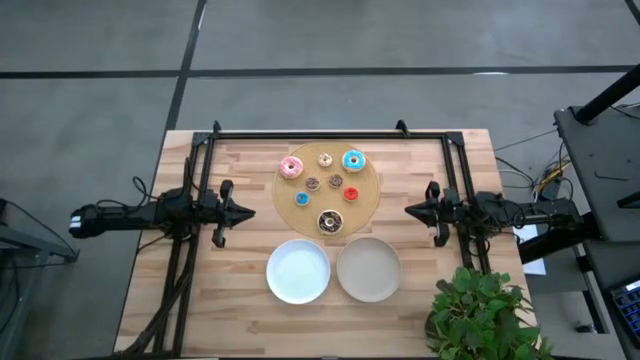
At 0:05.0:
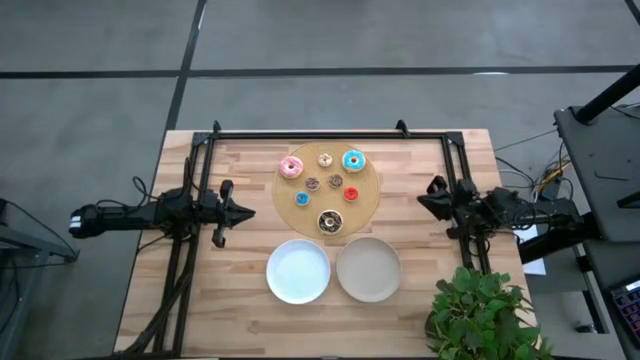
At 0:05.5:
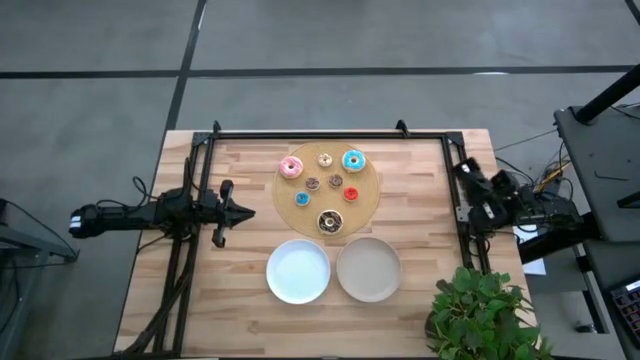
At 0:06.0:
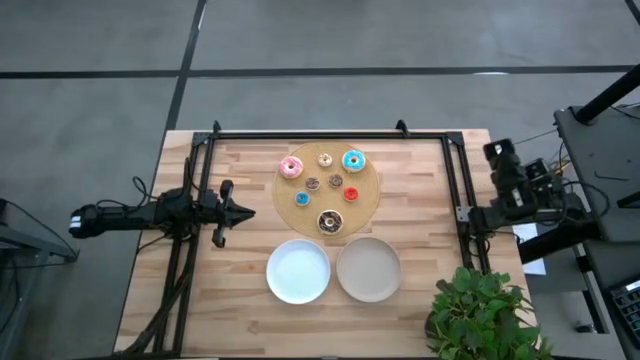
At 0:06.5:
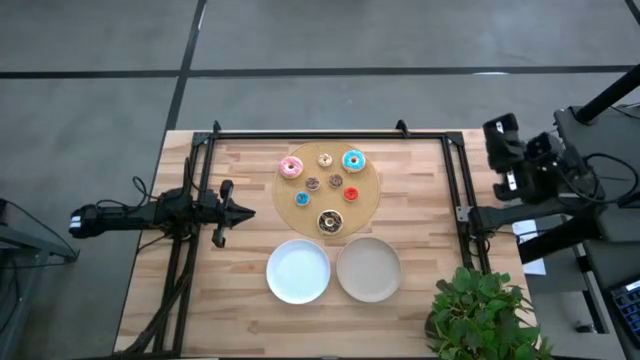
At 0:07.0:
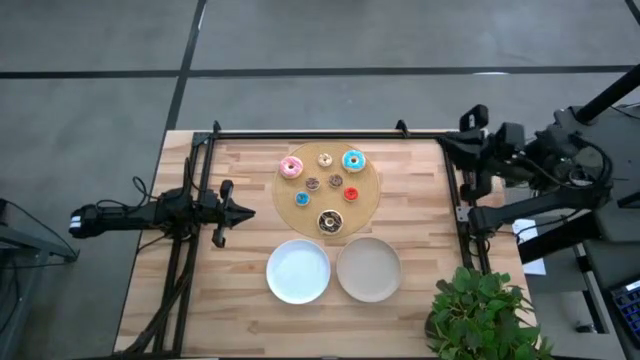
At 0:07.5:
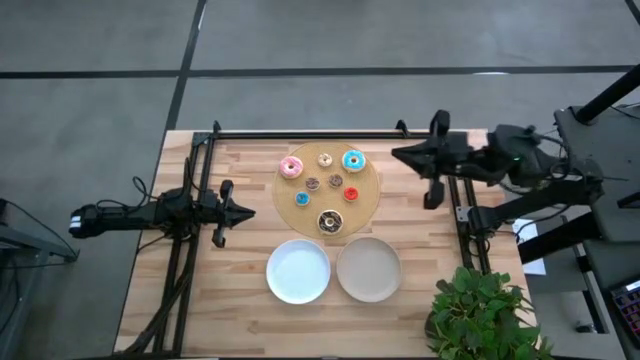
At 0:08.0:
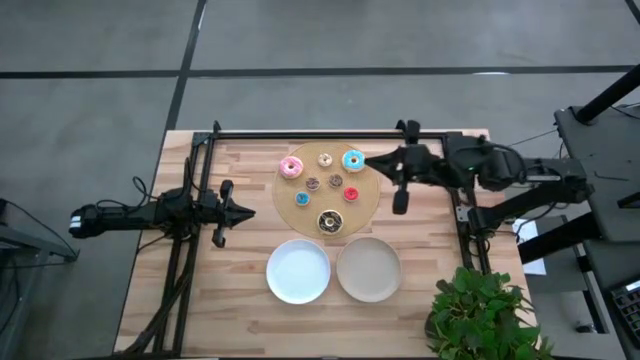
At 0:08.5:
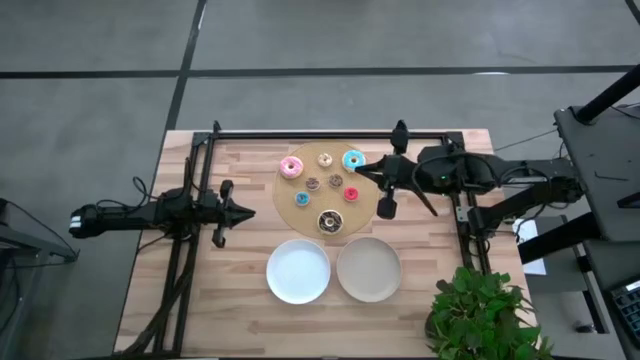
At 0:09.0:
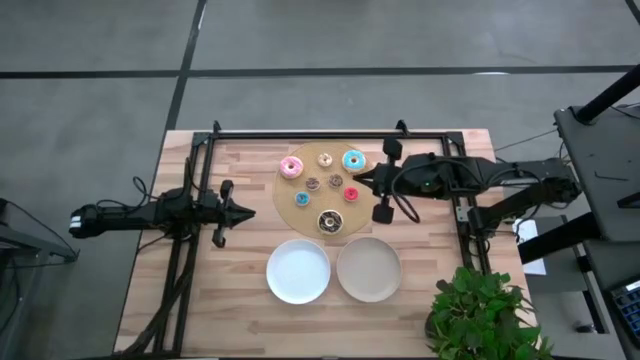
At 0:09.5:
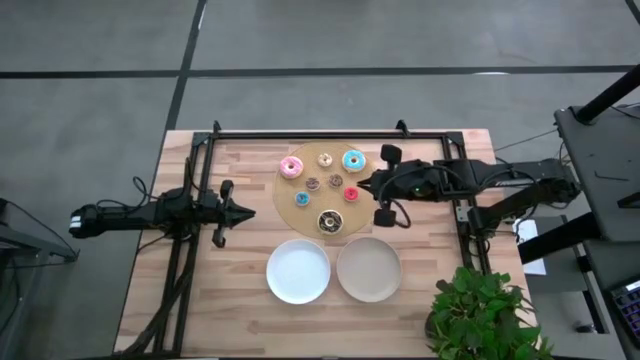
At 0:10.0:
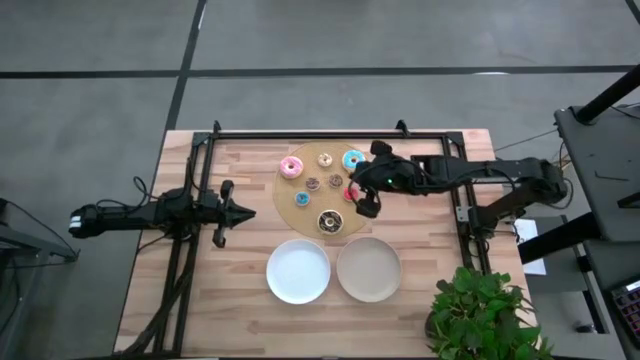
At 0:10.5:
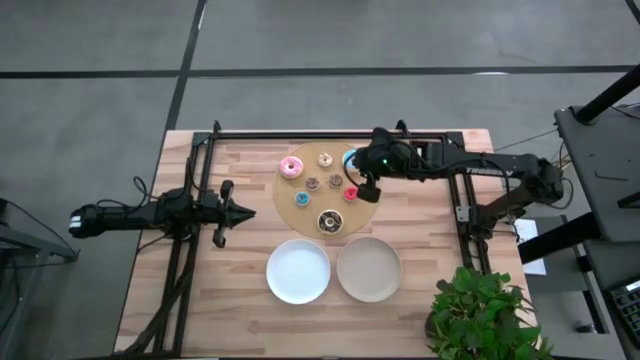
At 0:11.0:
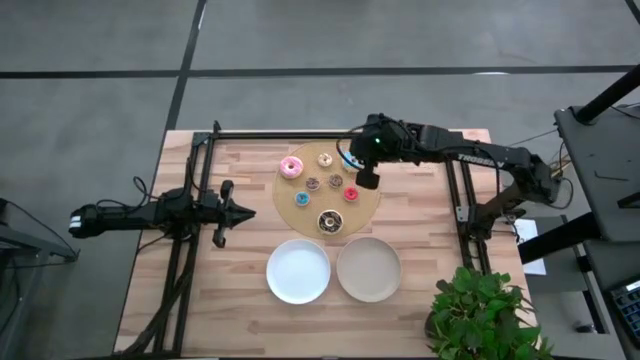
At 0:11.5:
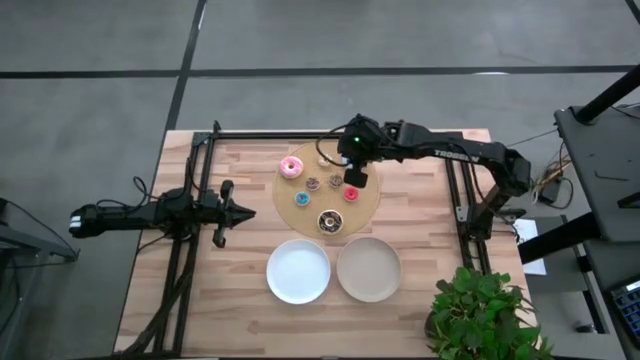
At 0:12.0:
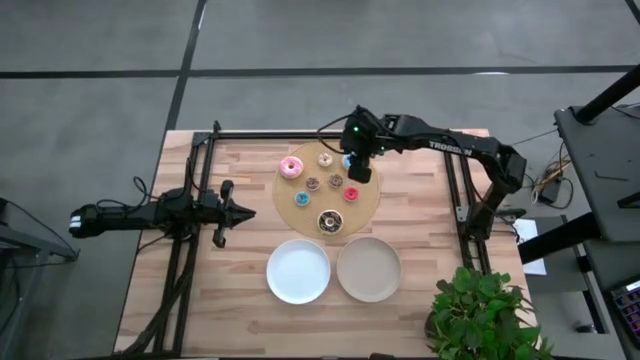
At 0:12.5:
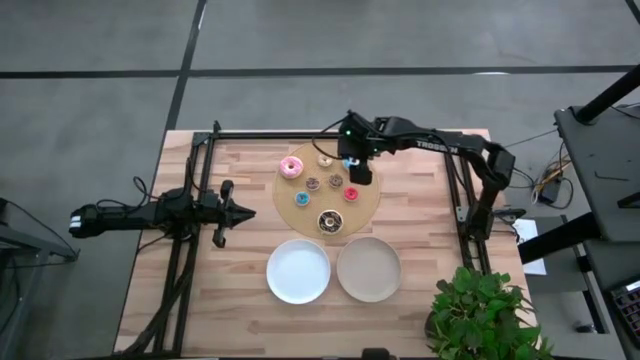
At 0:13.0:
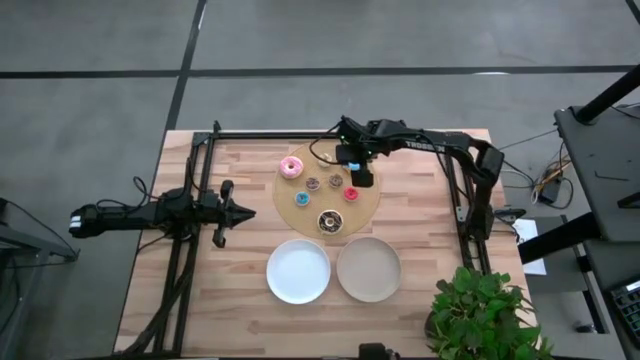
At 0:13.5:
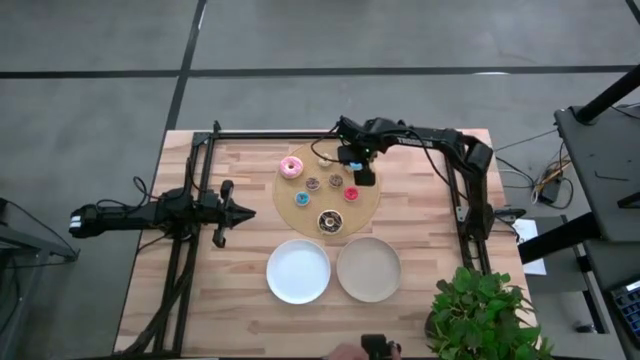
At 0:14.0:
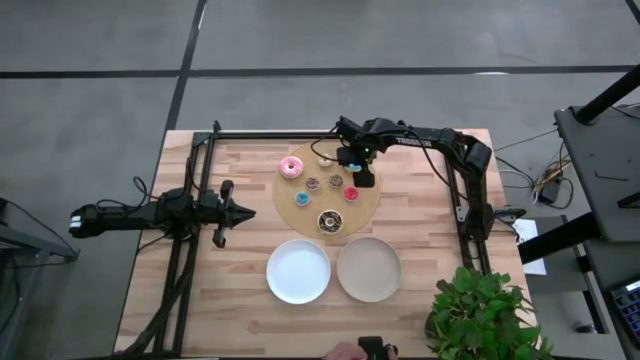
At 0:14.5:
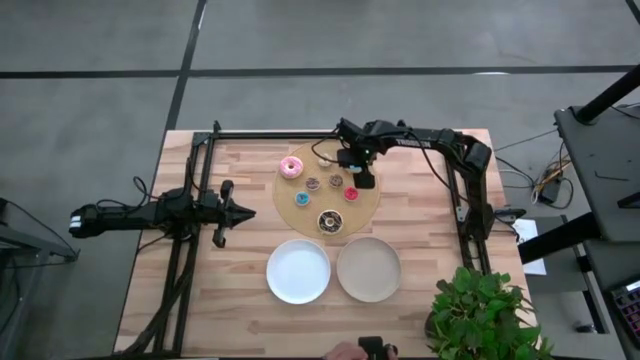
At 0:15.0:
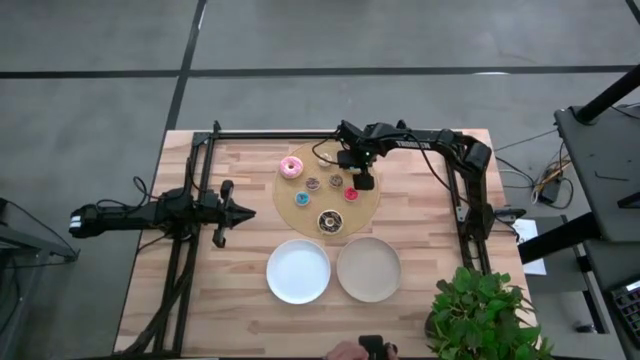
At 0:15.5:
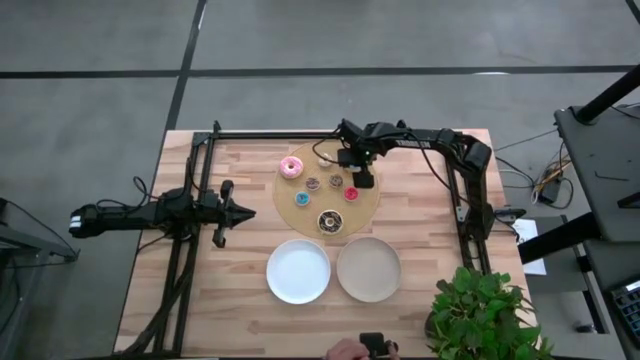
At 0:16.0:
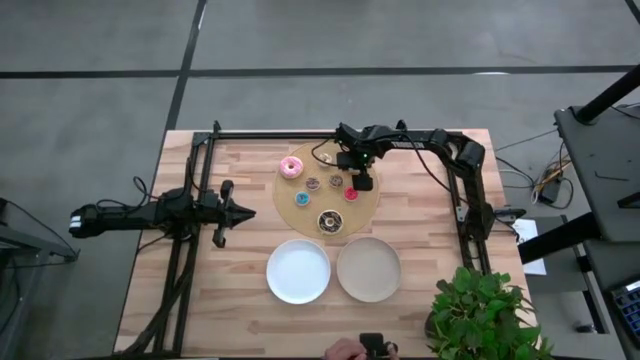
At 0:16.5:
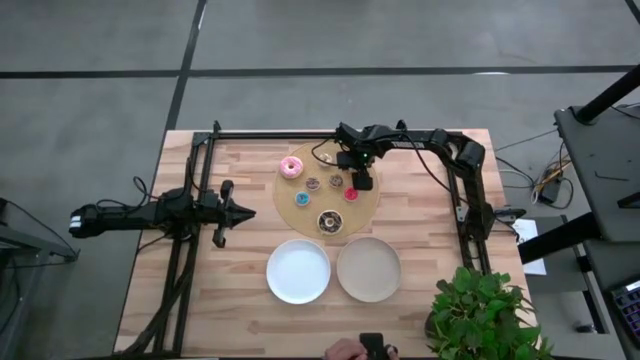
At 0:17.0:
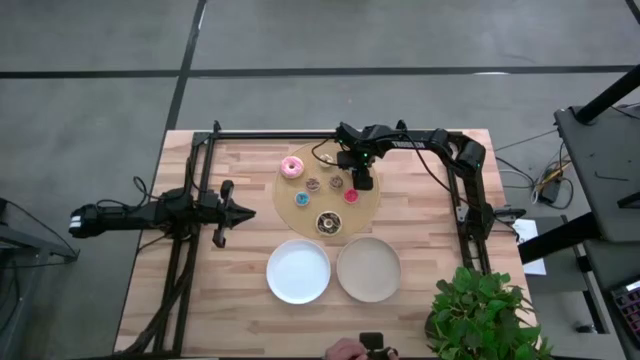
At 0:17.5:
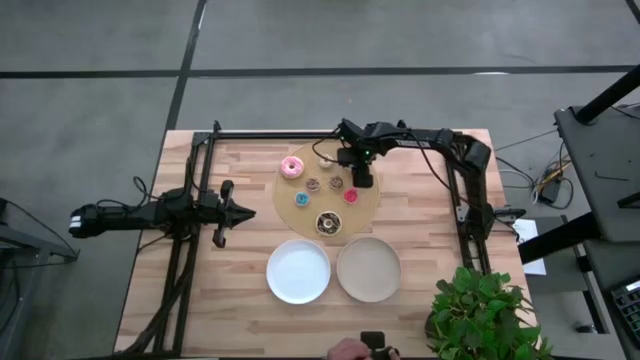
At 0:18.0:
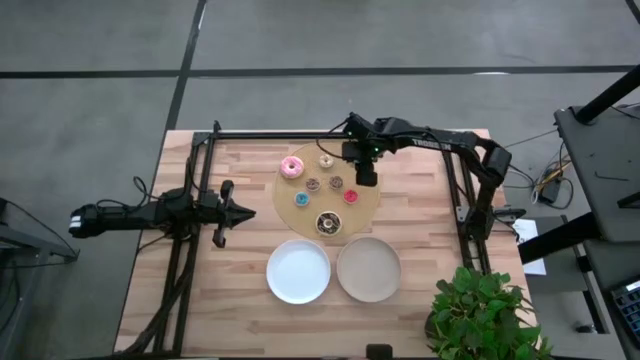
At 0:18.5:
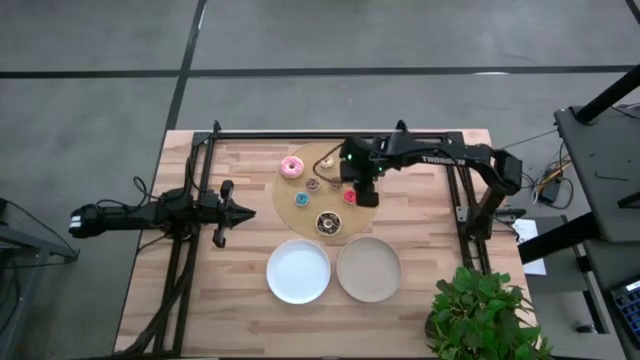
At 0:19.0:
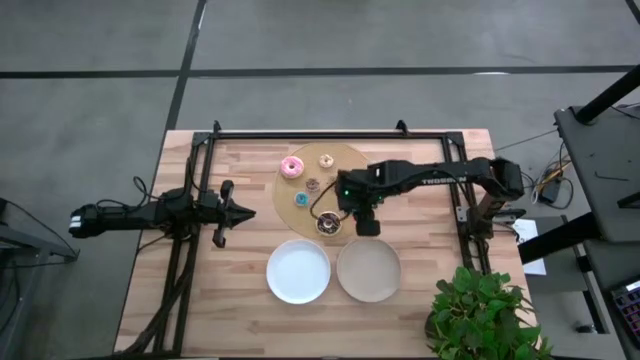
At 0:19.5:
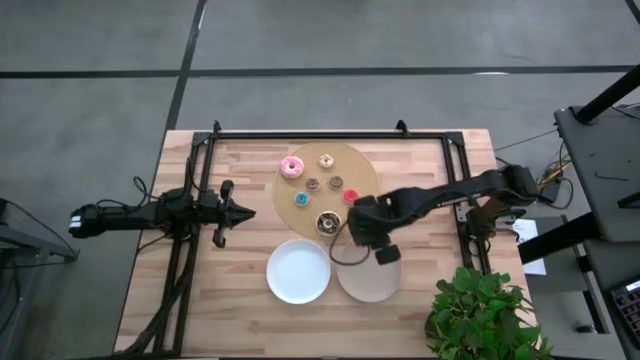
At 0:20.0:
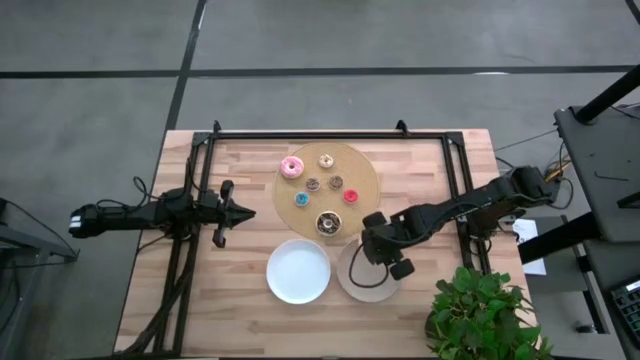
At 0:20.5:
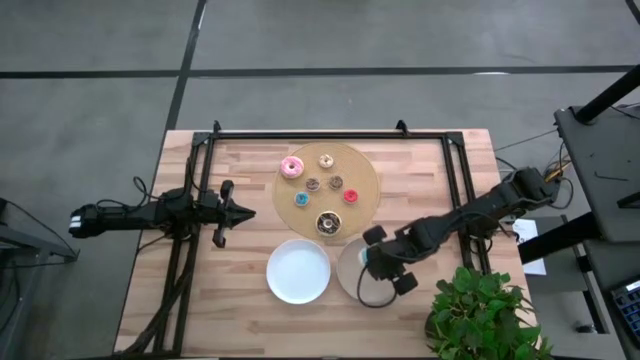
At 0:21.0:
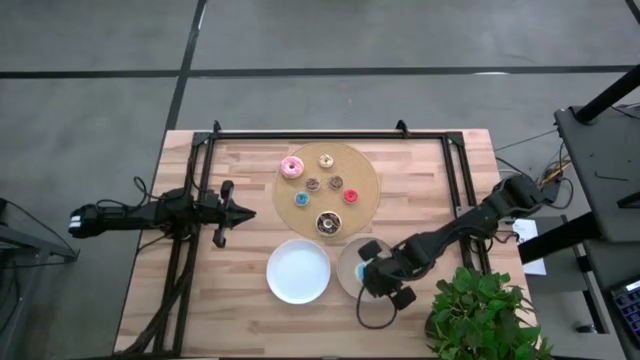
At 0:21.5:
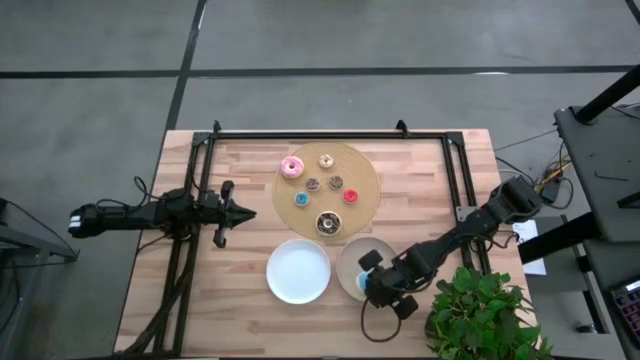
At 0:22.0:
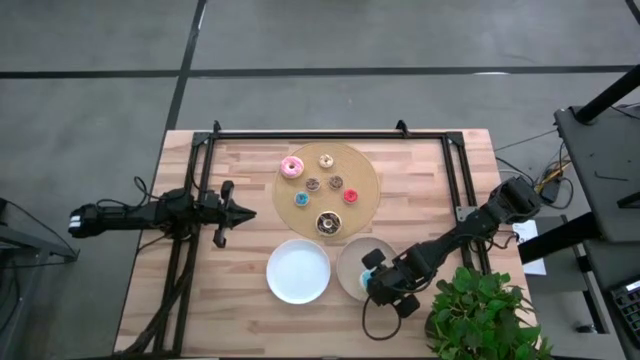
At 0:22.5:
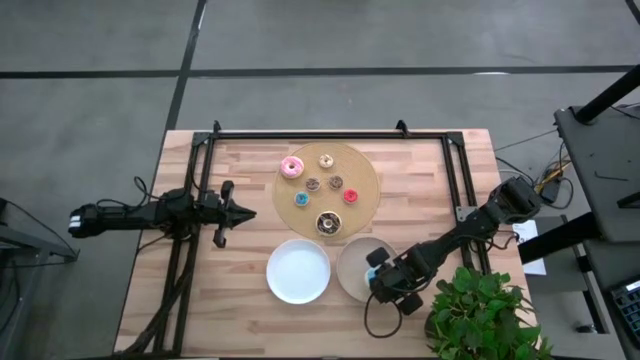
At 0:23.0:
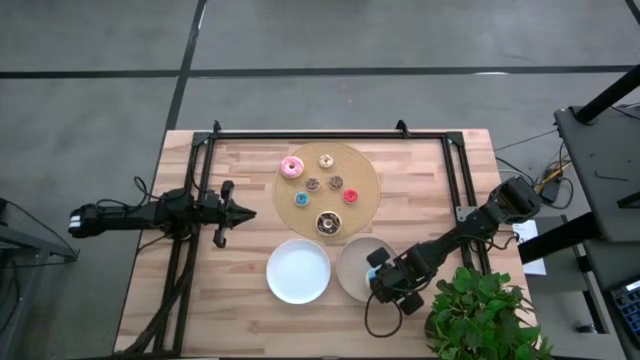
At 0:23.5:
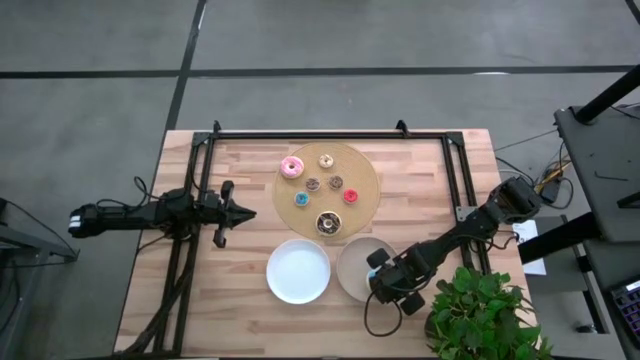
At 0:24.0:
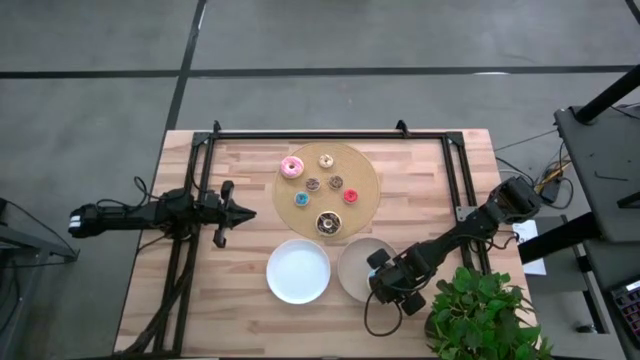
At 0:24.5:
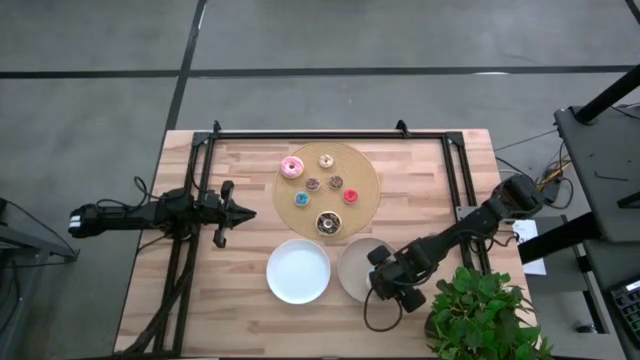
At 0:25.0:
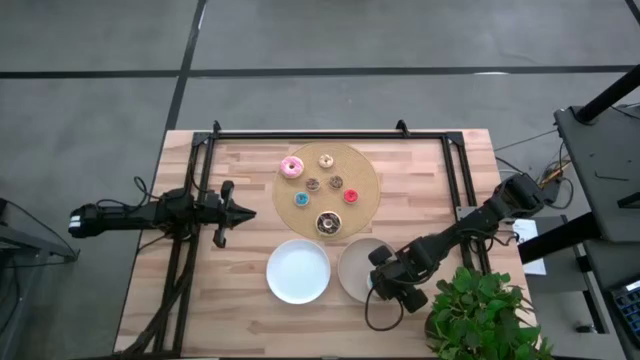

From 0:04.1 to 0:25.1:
Task: Pick & Place donuts
Put the big blue donut on the brown plate
